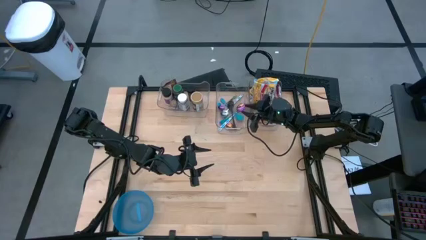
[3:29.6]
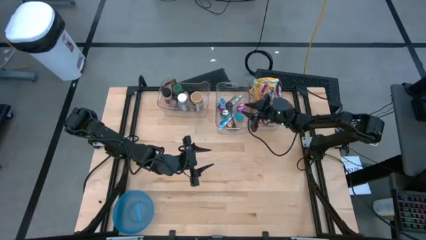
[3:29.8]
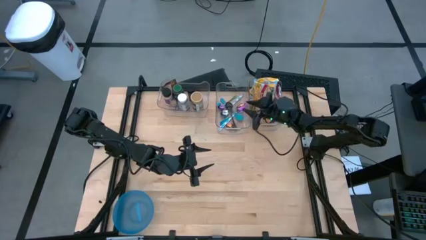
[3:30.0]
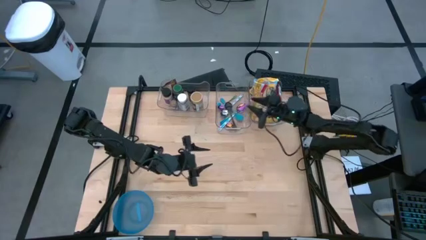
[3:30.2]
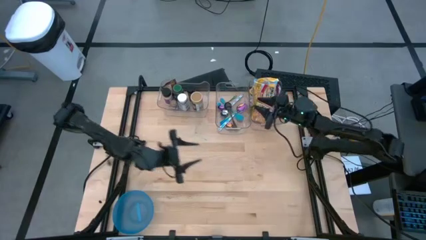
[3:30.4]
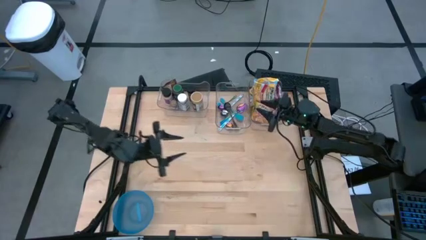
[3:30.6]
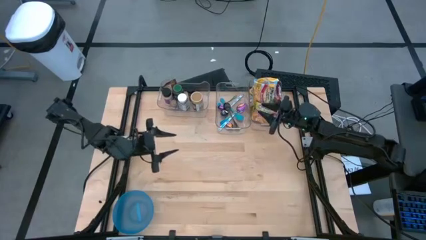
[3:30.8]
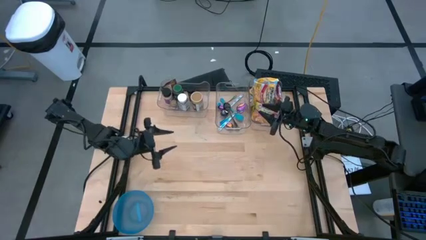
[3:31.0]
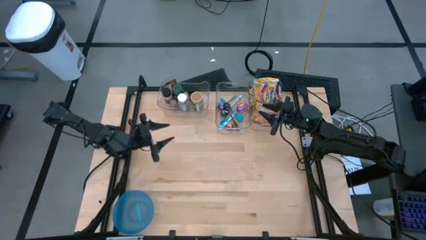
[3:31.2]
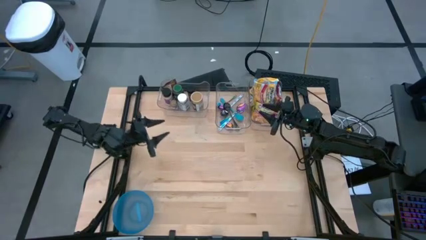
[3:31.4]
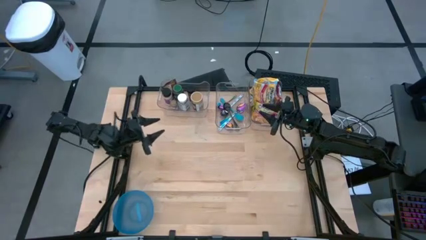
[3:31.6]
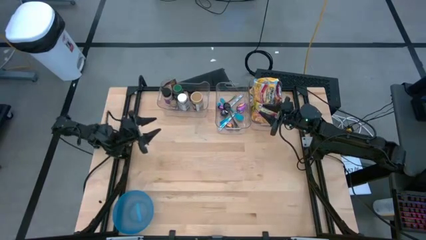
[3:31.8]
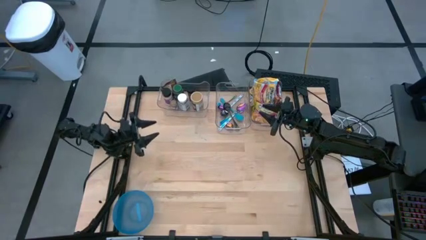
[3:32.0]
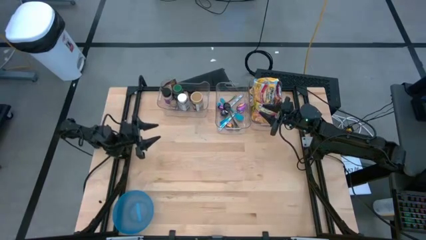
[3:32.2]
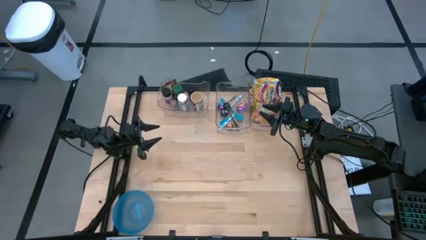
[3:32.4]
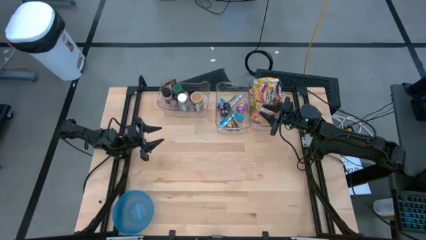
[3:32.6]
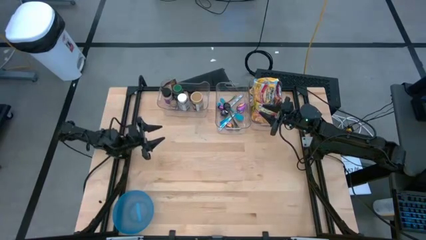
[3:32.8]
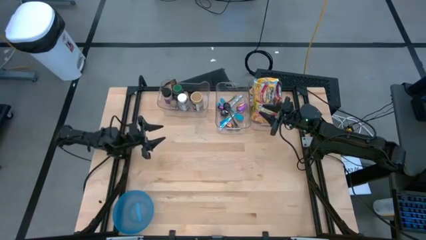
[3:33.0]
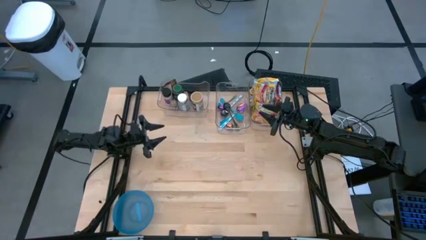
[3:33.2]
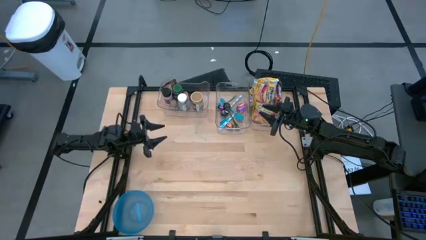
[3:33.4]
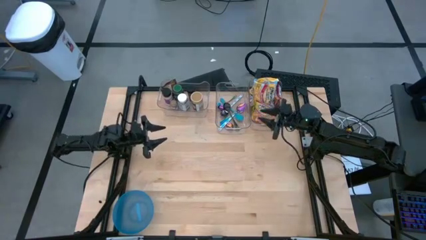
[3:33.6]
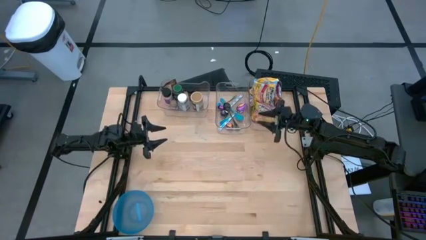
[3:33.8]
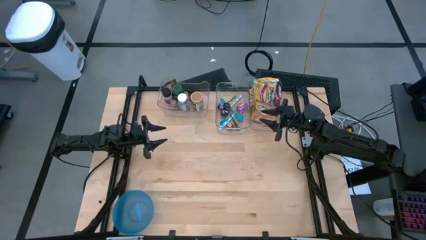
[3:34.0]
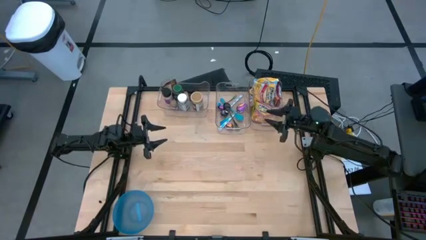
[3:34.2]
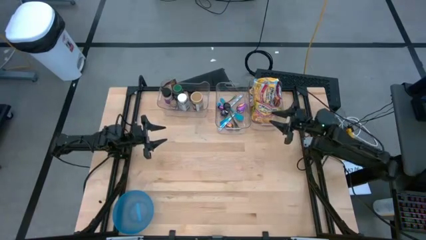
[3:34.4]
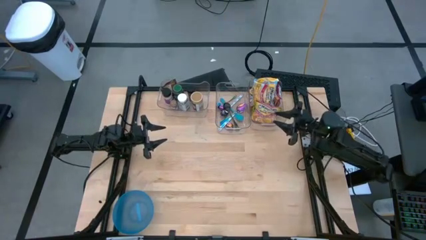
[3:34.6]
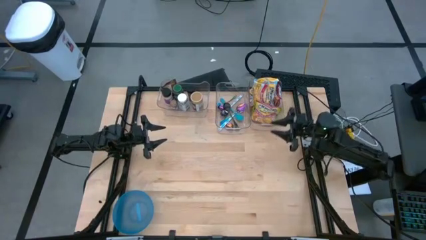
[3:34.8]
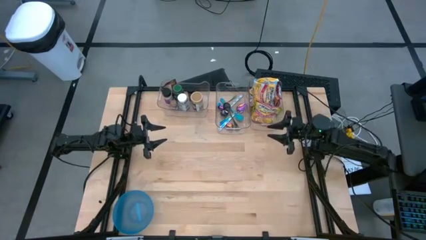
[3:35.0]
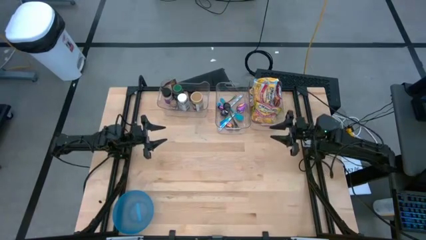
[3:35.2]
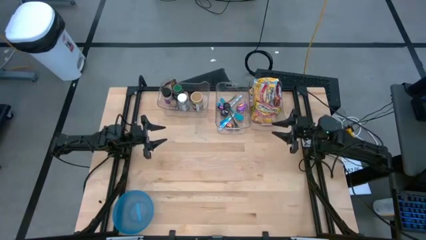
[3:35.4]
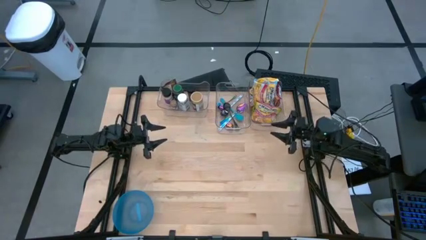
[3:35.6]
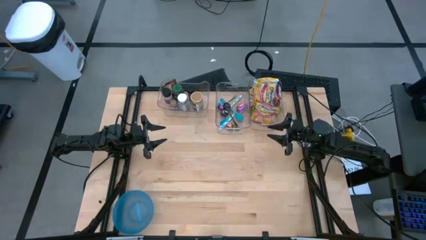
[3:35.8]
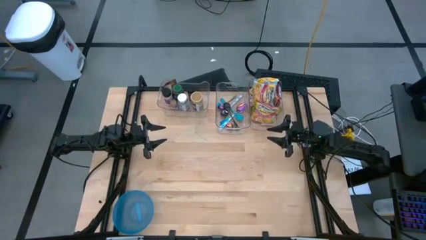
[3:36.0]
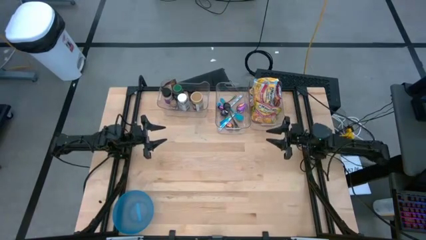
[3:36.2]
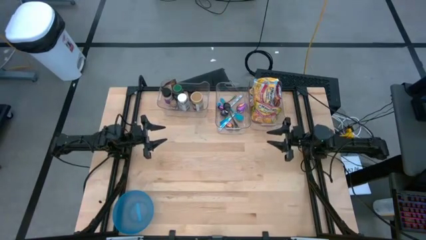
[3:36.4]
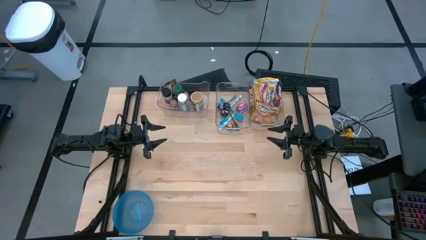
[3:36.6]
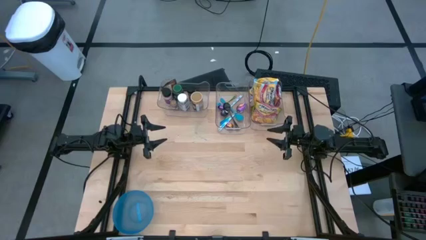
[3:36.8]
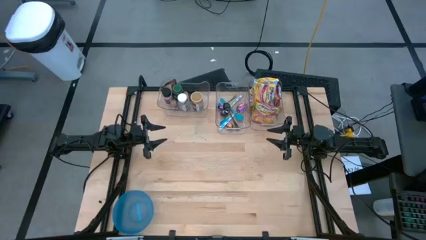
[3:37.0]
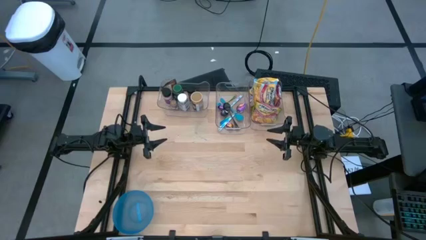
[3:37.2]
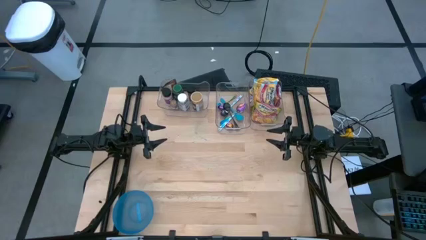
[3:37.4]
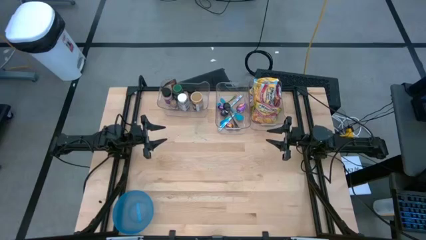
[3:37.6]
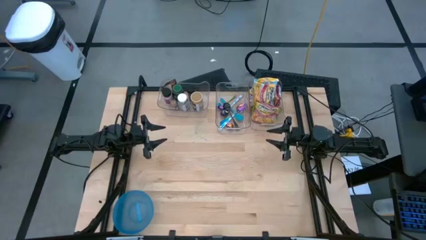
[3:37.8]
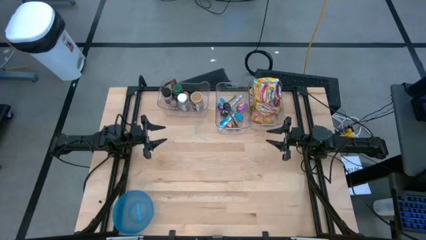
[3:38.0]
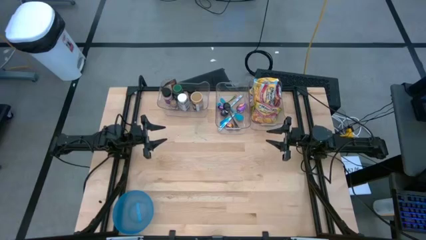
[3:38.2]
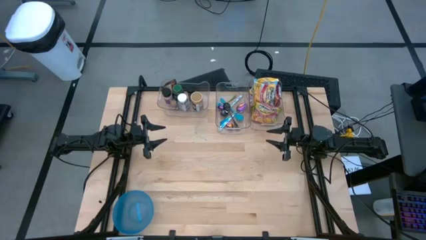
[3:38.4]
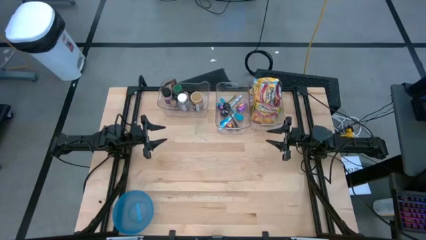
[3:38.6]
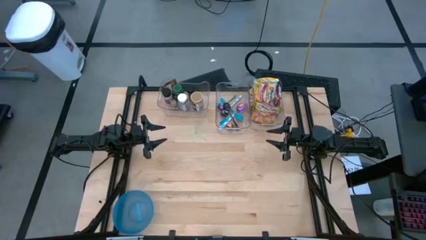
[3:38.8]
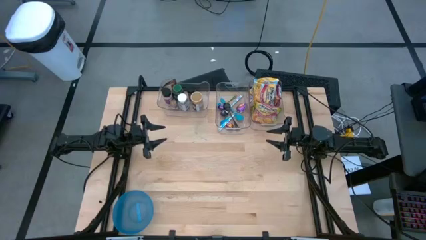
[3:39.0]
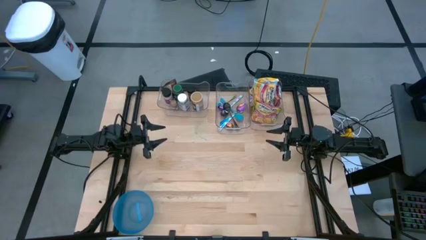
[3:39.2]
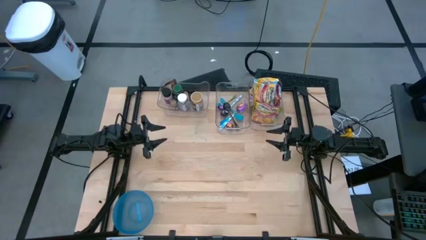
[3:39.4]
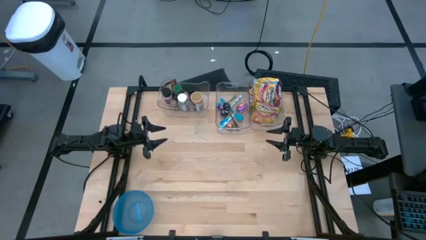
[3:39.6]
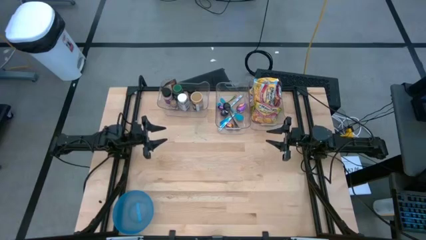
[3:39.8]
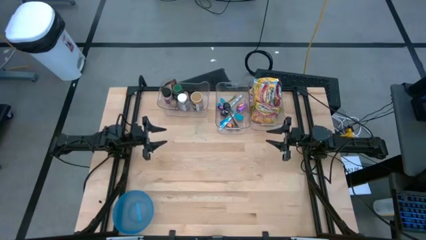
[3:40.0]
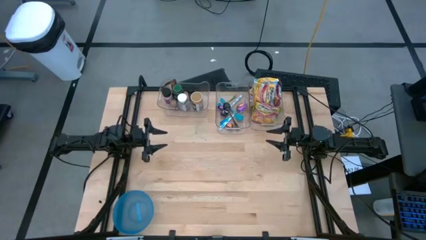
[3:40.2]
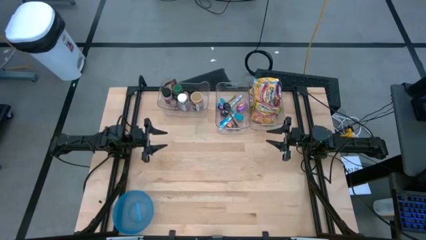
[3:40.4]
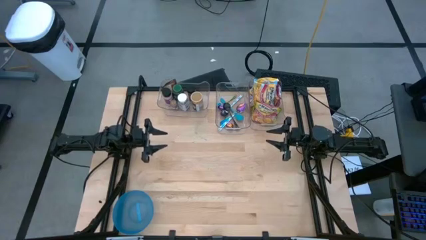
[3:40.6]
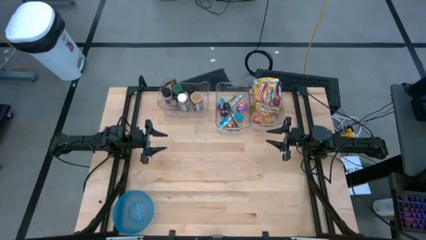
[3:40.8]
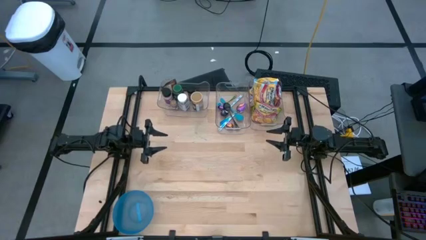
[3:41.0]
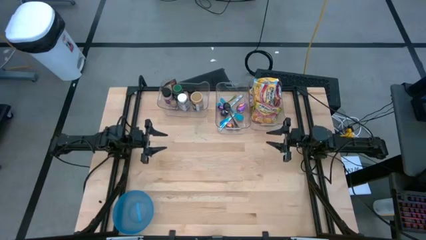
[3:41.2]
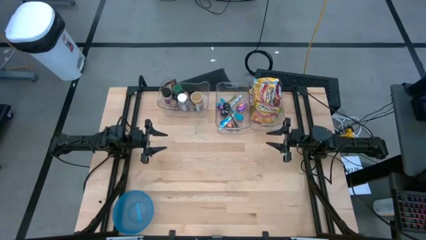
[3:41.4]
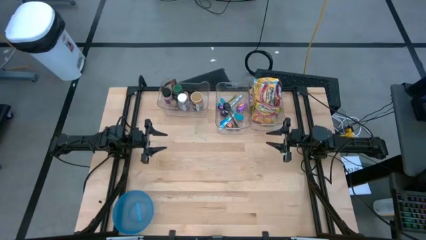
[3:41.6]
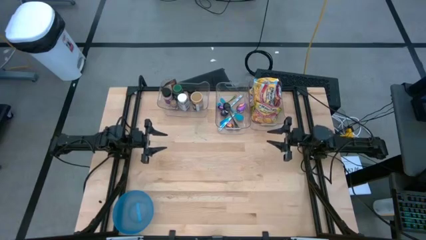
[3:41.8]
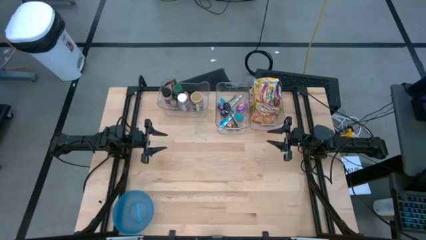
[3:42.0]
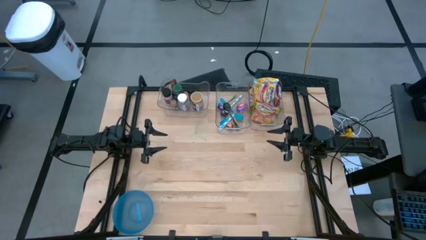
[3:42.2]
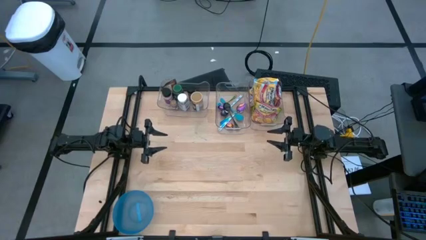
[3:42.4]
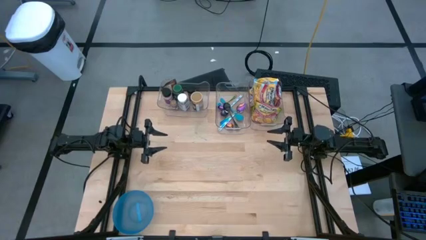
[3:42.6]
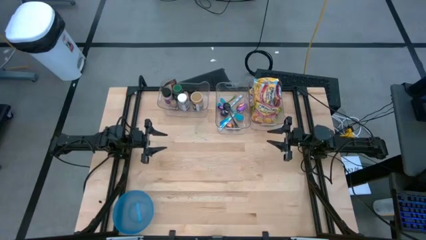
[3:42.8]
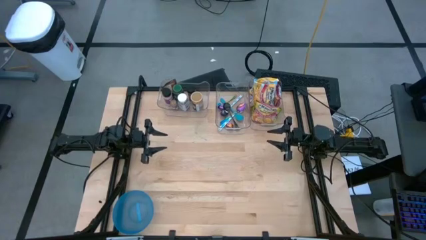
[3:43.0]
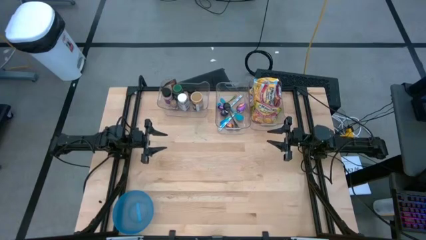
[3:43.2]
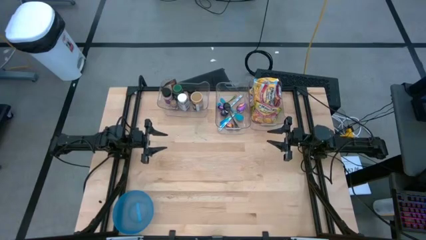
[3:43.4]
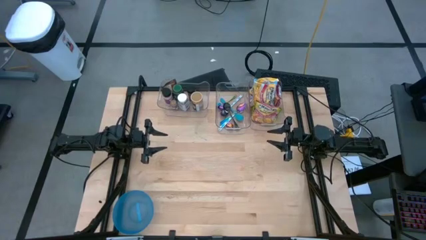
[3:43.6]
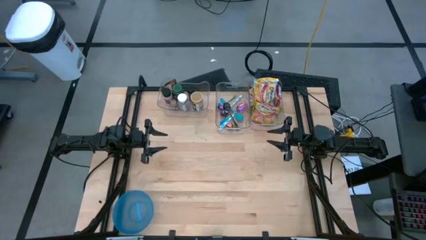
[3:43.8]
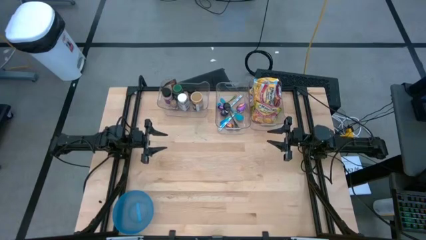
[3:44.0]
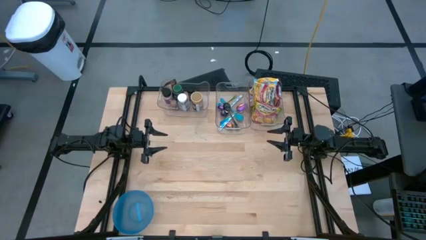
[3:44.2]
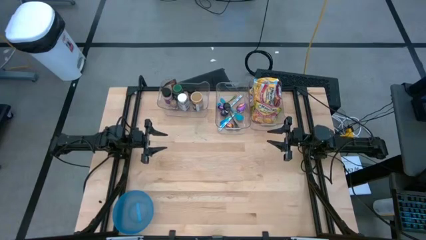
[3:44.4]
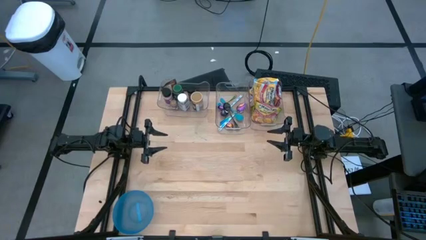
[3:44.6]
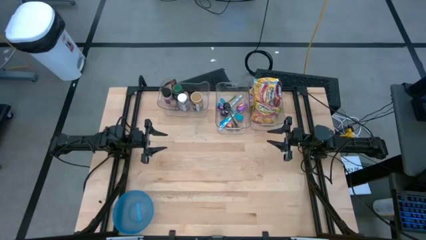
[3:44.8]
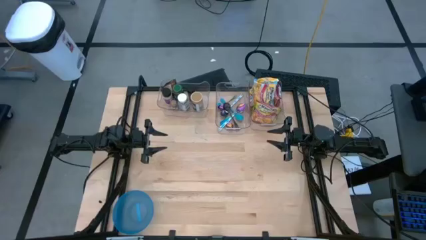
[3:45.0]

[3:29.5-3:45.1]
Task: Pick & Place Food Item
Return to Home Position
